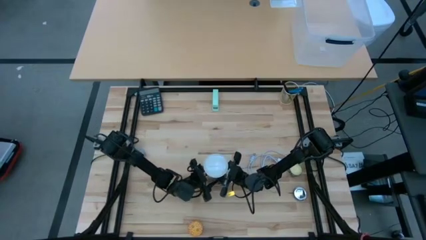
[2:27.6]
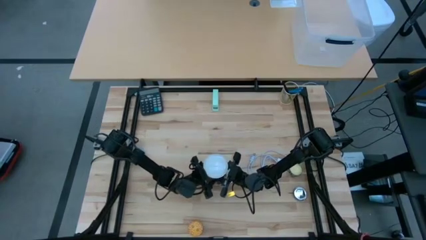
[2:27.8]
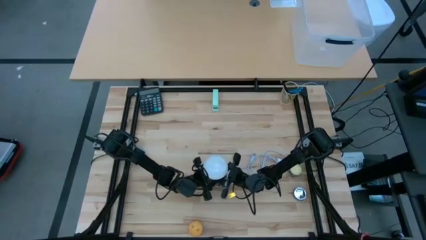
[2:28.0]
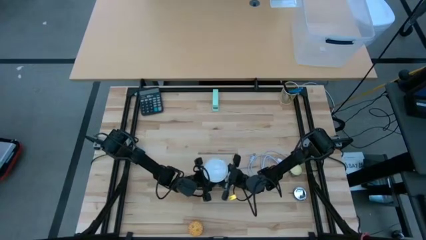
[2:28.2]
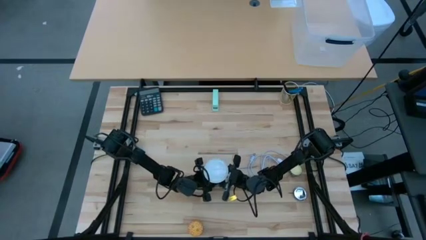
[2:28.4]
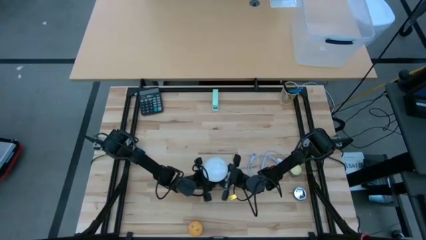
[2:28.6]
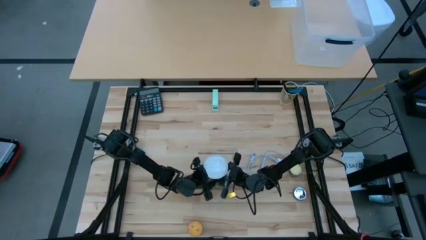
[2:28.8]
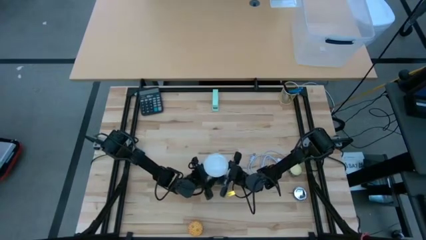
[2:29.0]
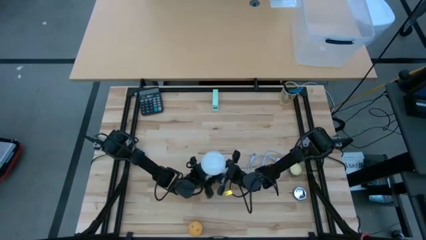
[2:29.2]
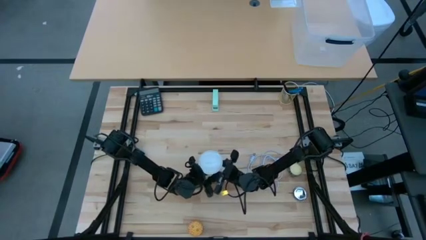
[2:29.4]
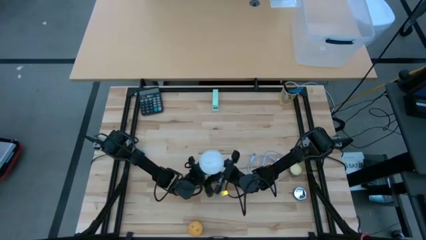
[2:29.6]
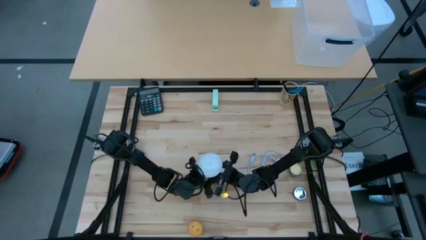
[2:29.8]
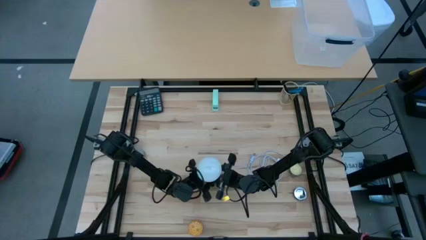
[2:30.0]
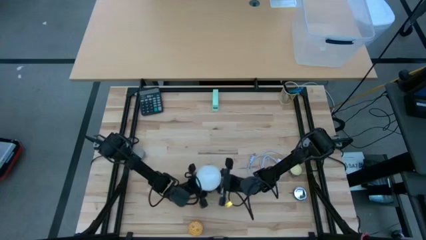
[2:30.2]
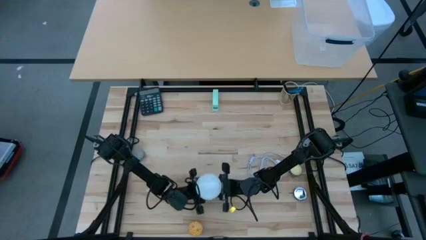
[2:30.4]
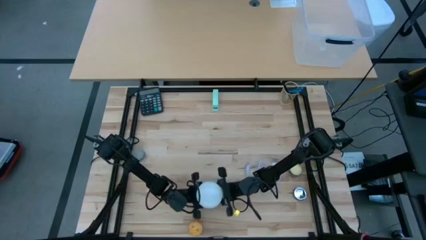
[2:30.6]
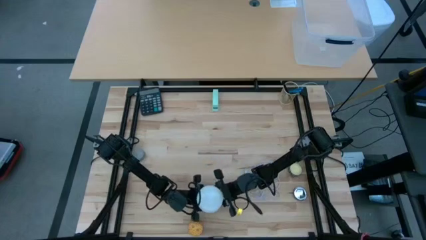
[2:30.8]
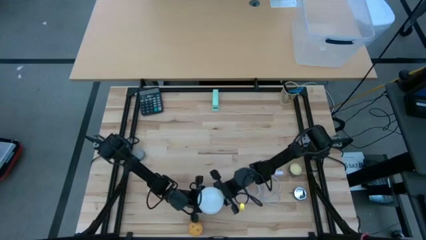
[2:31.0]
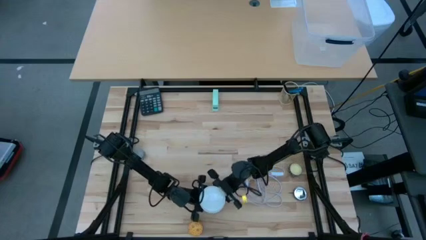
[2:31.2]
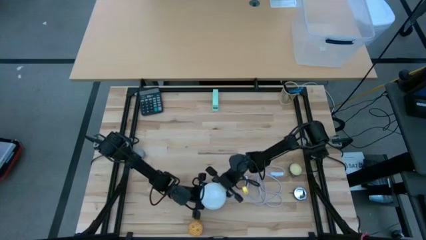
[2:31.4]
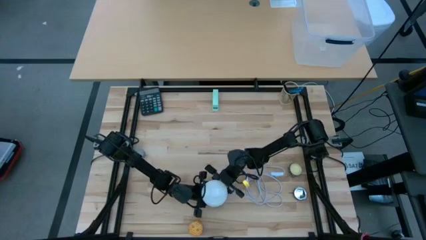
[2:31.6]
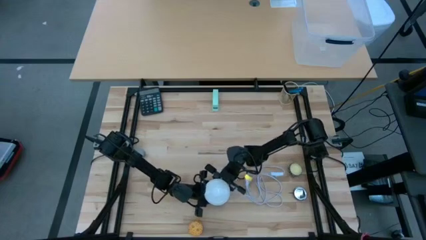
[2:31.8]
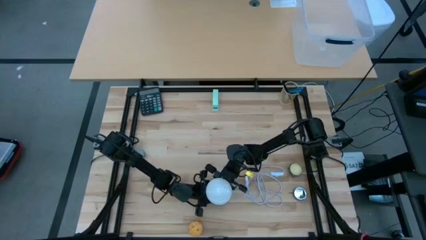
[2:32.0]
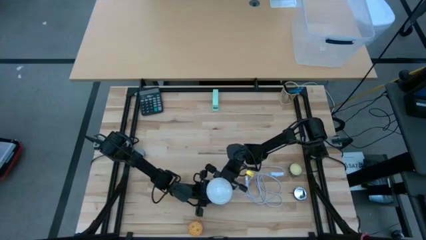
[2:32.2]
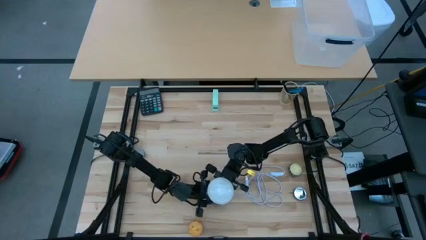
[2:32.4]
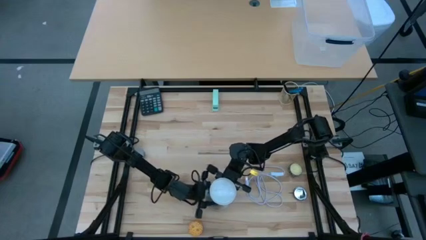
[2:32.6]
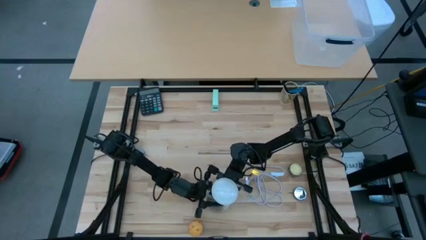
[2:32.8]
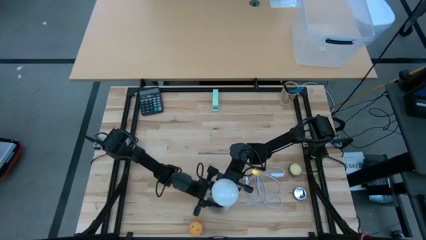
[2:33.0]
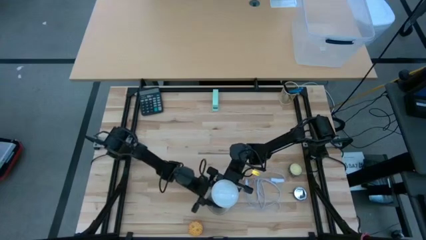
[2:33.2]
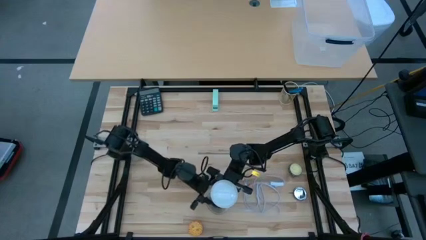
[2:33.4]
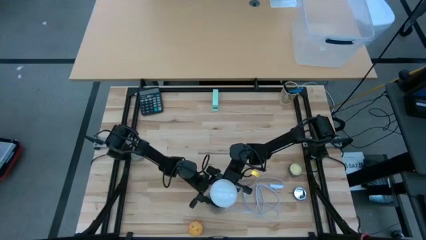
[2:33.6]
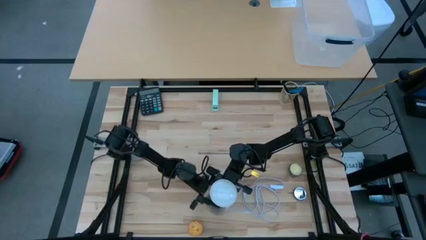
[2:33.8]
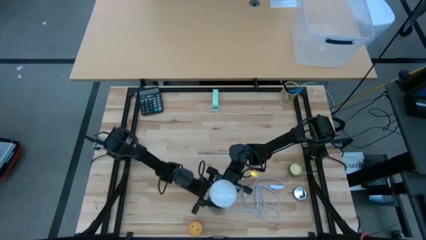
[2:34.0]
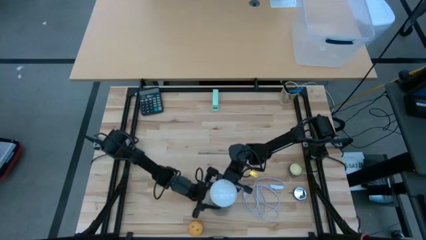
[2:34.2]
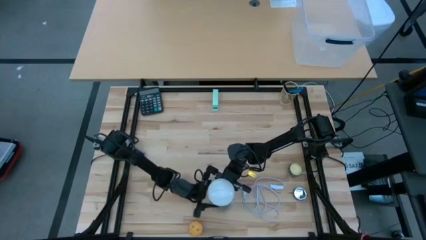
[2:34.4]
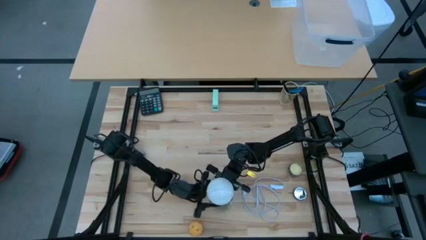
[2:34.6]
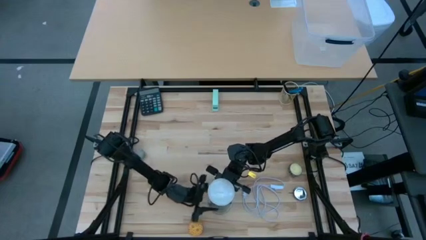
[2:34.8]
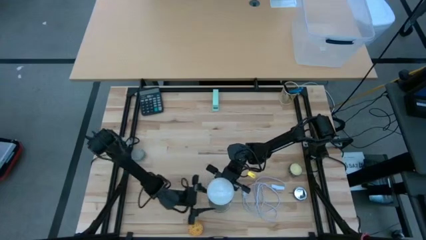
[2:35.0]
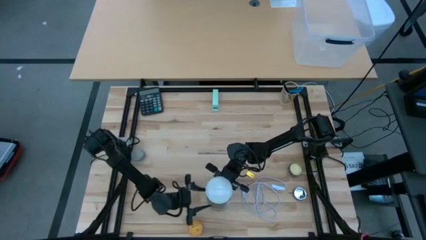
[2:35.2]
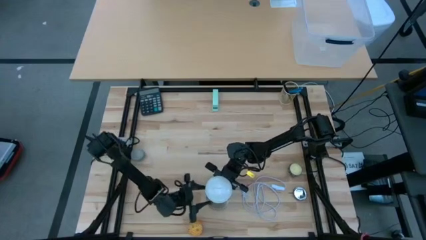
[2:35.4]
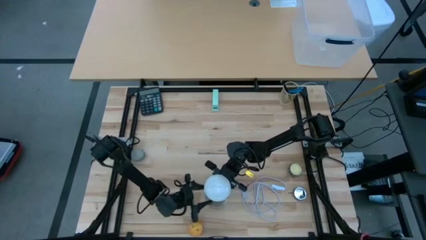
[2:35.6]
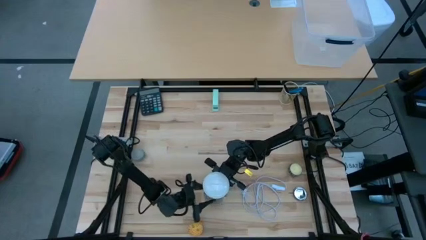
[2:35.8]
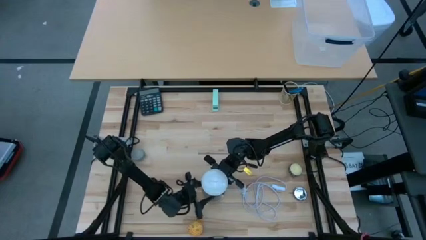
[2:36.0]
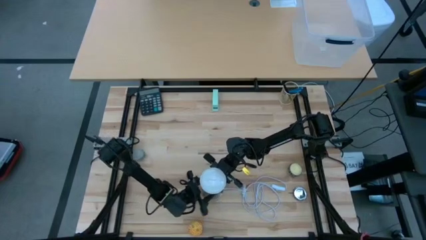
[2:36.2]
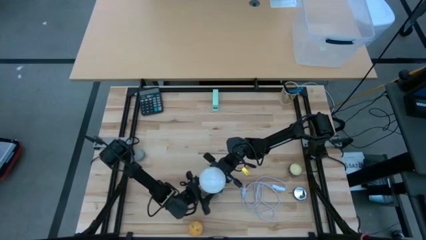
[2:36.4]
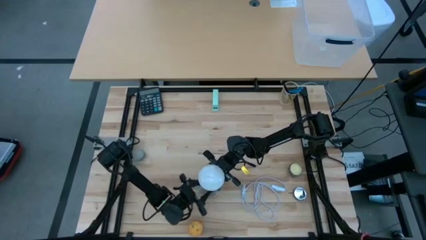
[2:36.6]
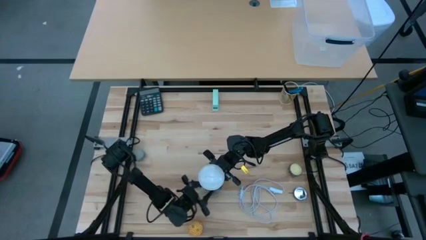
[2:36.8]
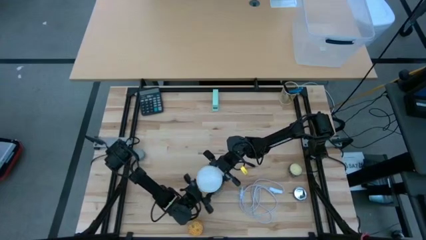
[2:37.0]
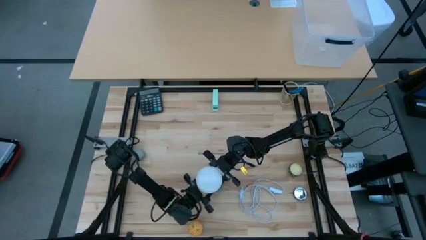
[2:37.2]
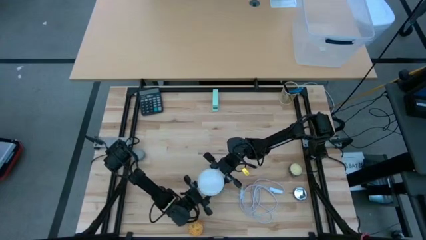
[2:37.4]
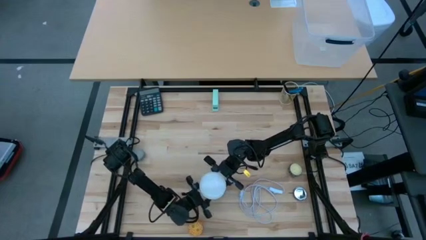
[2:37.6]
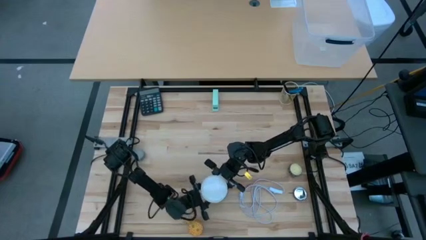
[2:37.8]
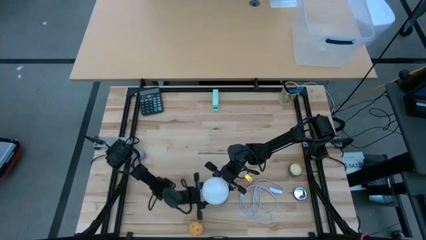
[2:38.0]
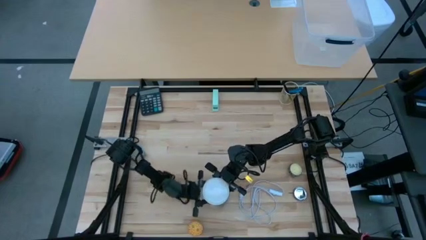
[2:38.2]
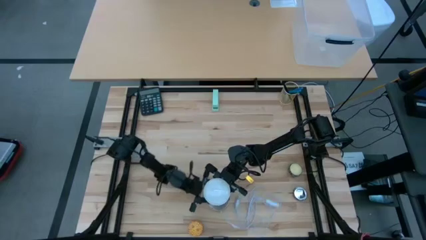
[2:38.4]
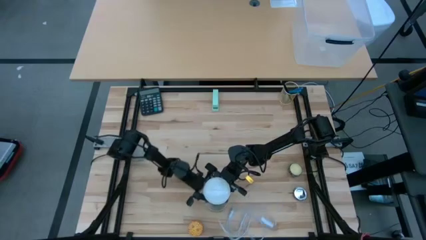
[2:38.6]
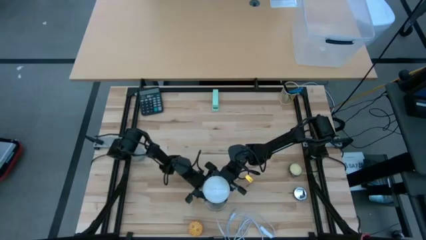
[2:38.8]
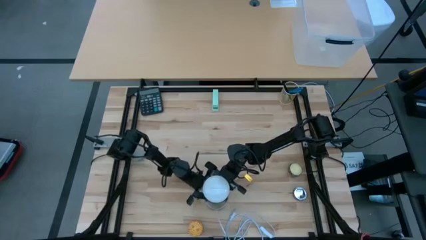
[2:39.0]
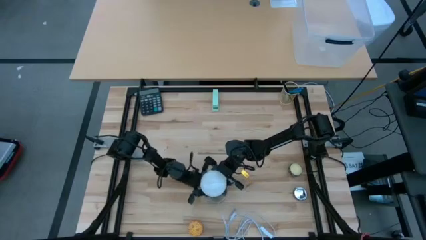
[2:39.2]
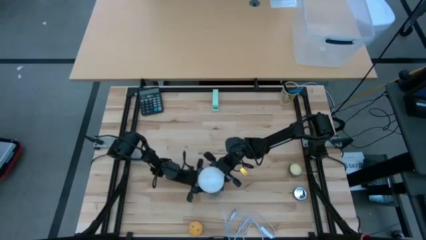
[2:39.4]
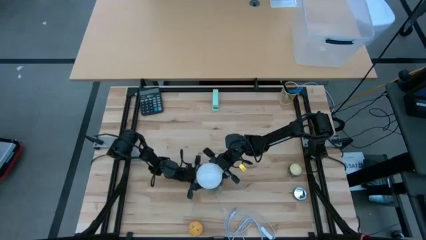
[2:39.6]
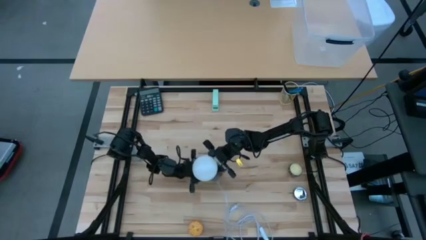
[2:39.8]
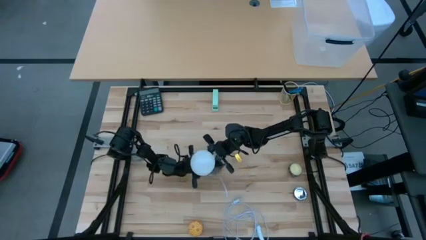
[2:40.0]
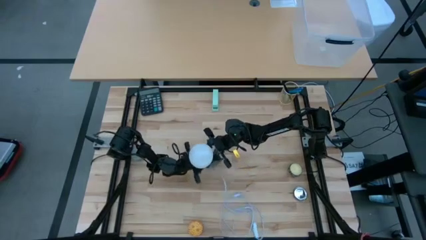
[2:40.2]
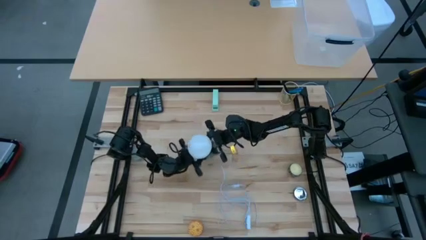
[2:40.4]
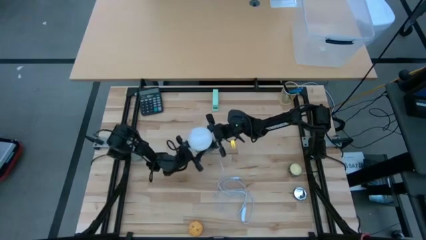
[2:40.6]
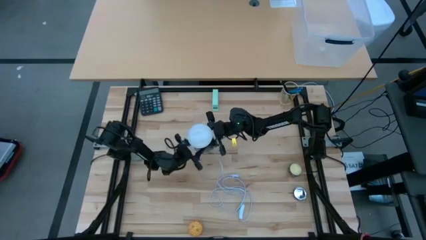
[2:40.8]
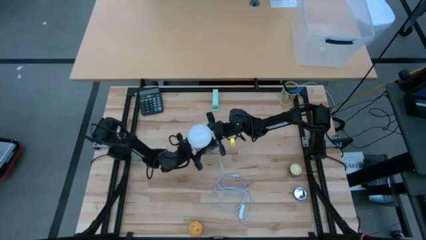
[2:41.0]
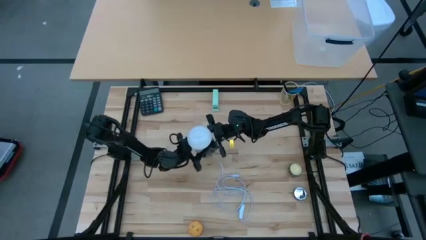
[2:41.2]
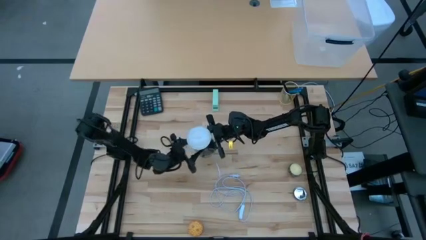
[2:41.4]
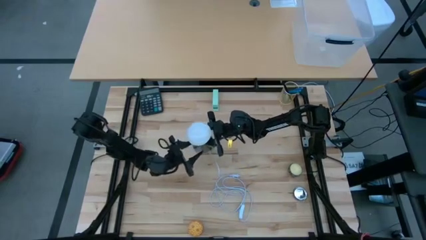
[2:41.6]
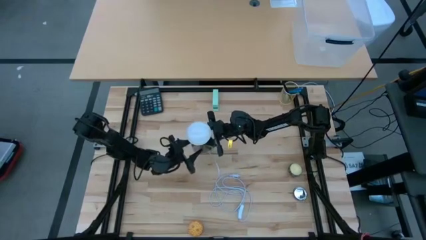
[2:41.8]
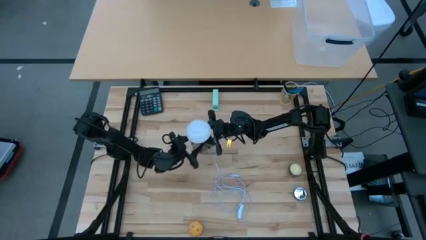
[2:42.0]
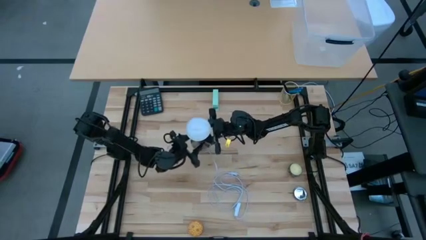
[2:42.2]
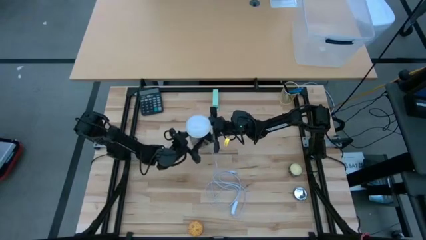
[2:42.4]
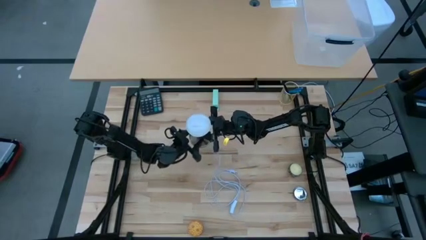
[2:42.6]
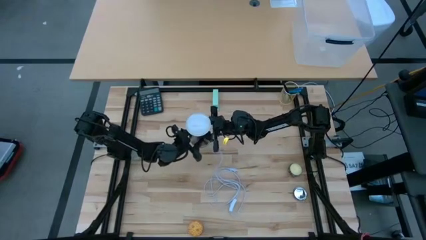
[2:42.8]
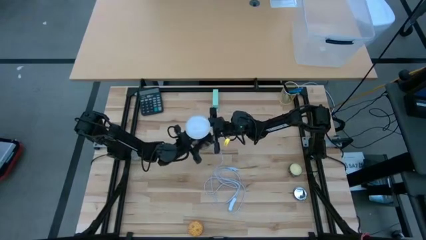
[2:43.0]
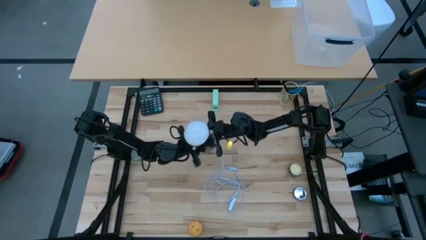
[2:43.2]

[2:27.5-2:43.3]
Task: Screw lightbulb
Remove the white lightbulb from the silver lamp
